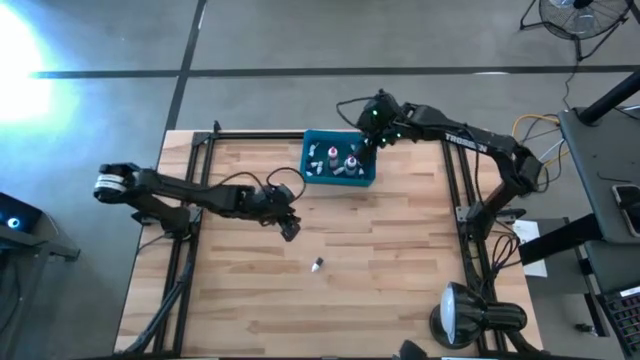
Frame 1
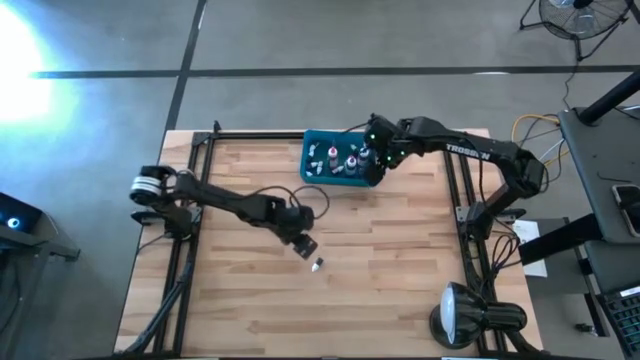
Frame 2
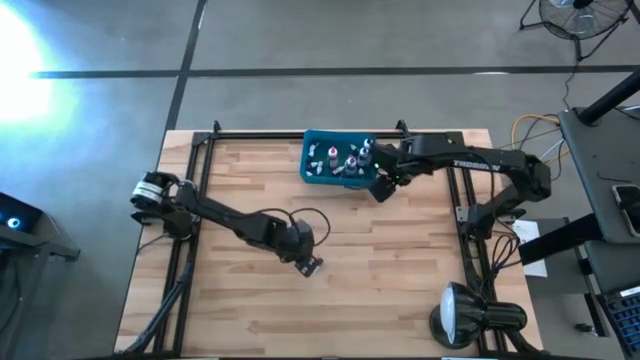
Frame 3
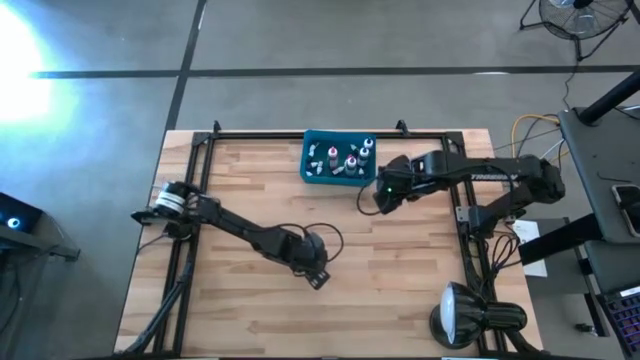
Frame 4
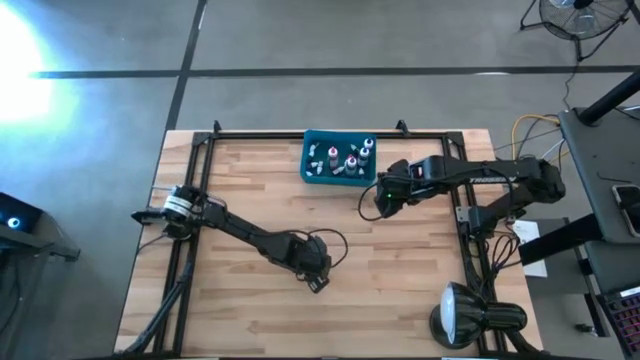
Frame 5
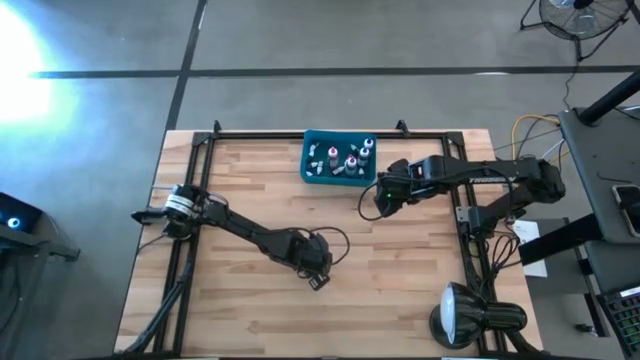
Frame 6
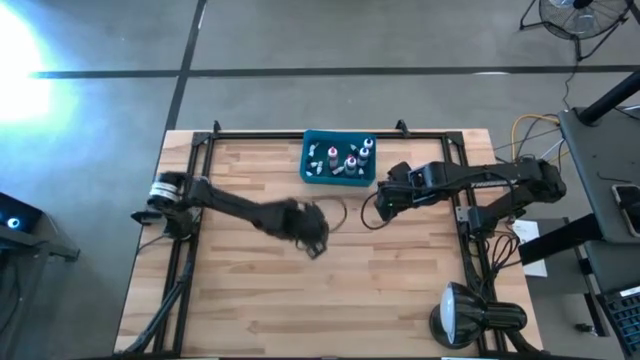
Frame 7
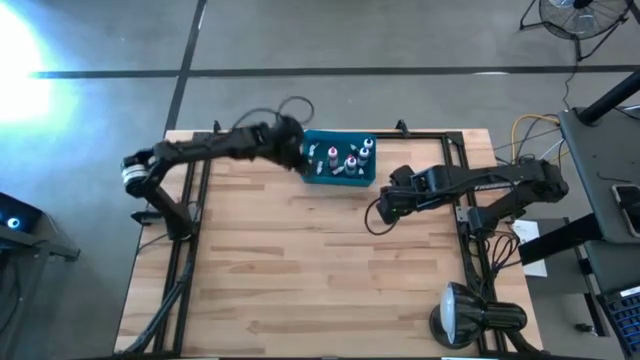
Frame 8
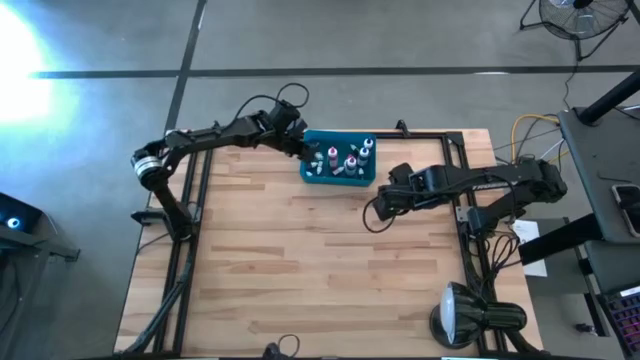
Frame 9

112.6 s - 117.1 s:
Task: Pick & Place food coloring
Put the small black food coloring bottle into the blue bin

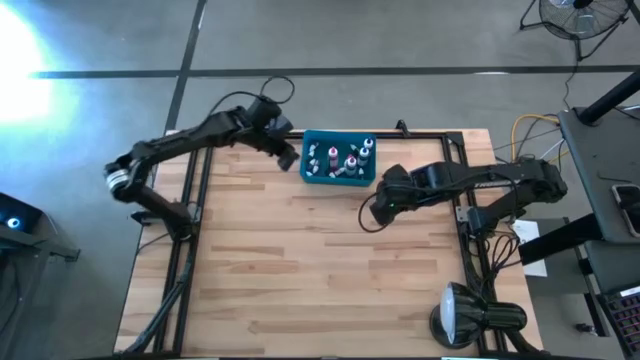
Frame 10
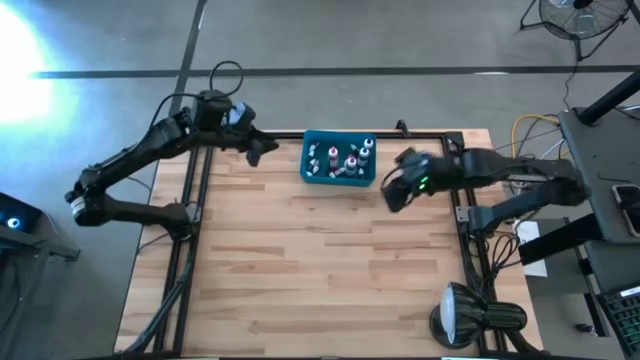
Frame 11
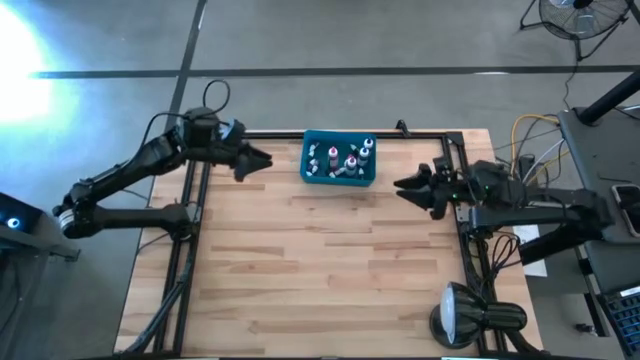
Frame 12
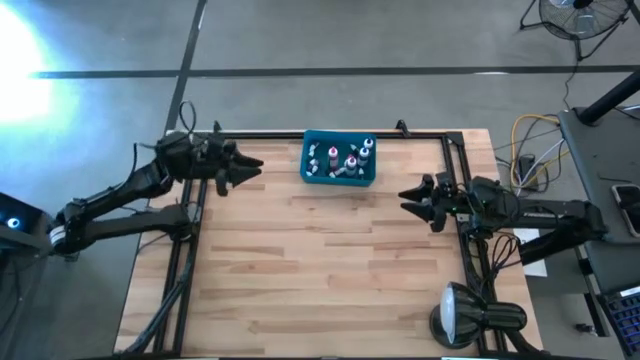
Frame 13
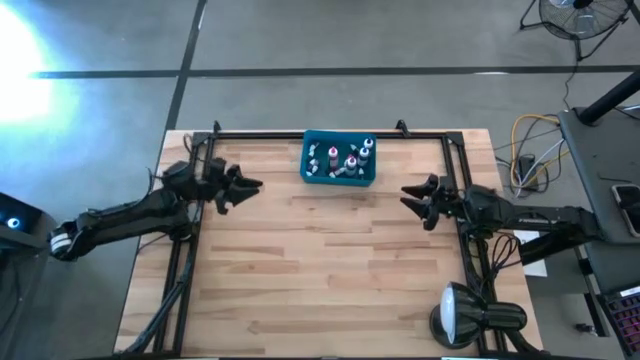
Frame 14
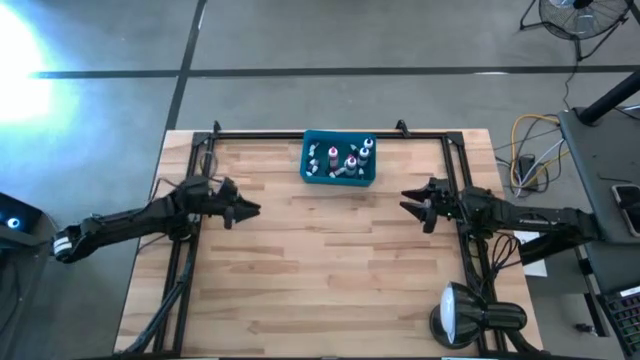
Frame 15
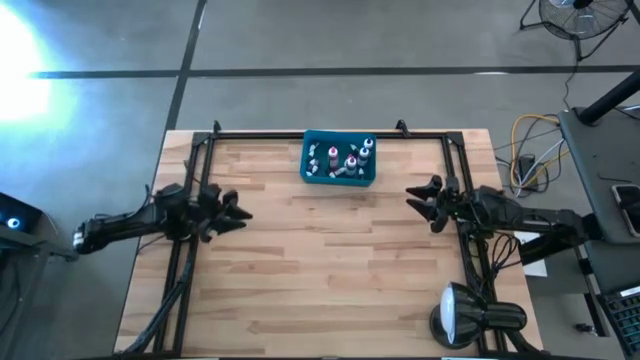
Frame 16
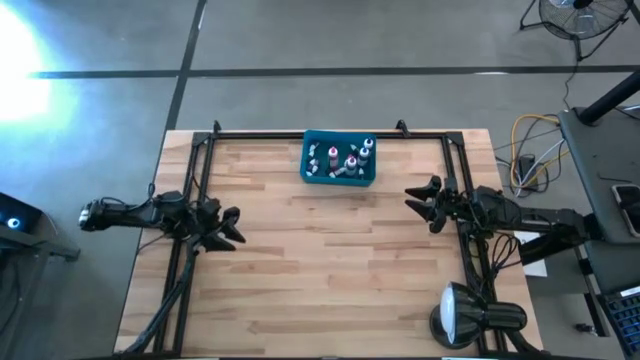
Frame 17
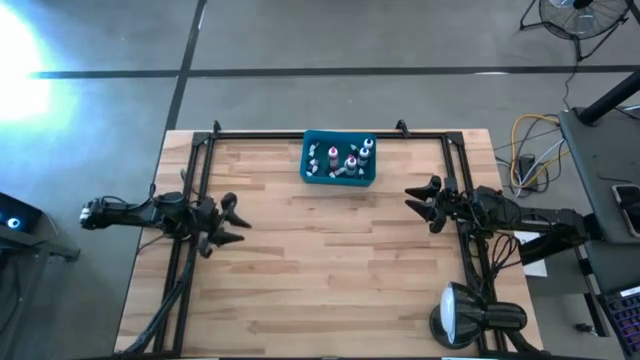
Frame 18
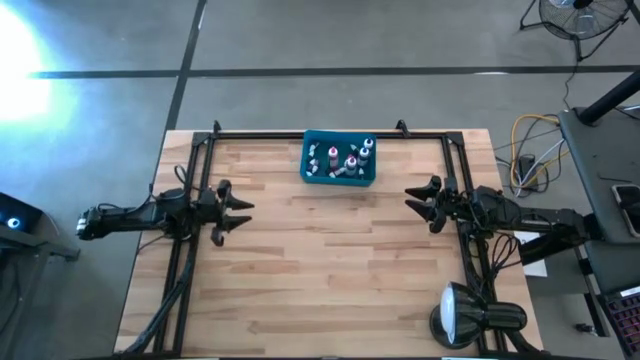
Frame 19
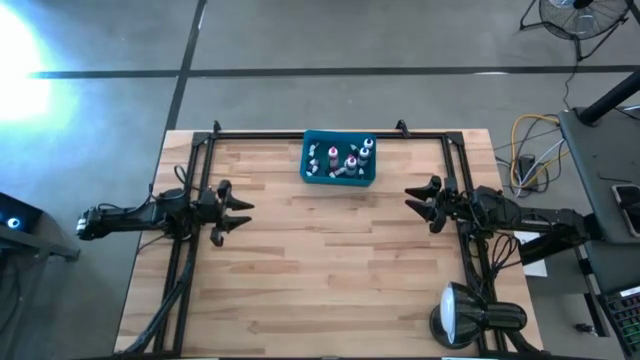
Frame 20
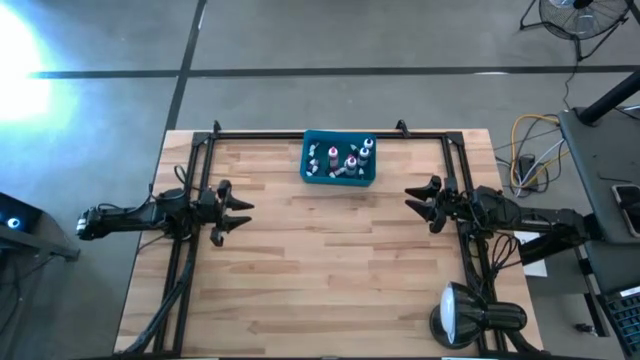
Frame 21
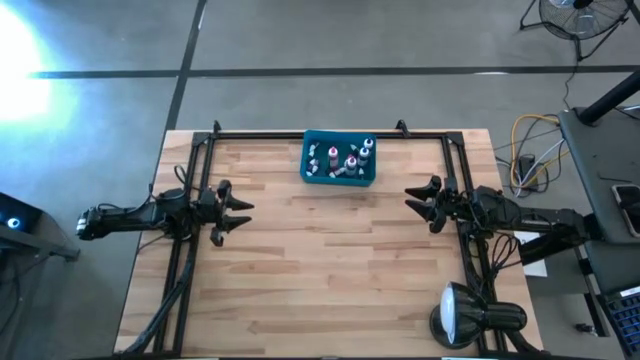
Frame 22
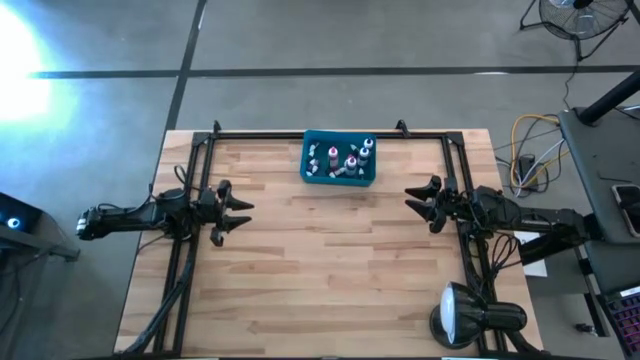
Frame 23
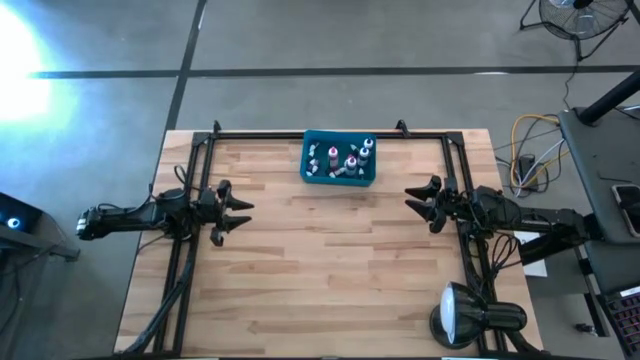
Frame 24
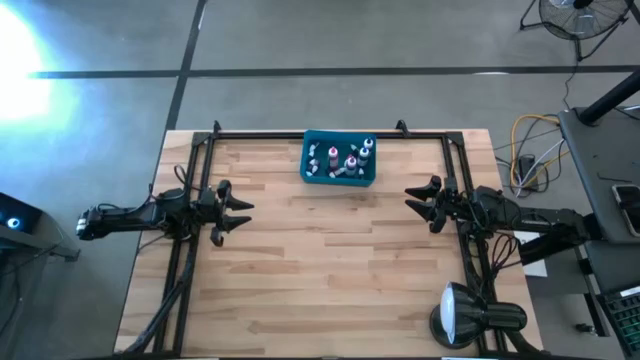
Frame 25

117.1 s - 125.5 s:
Return to Home Position

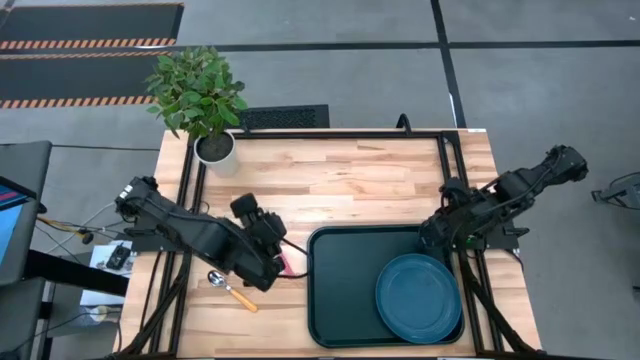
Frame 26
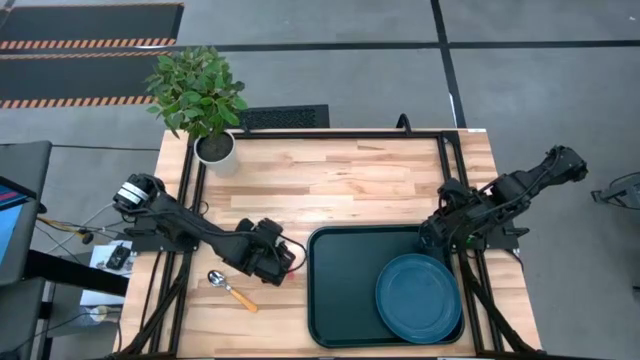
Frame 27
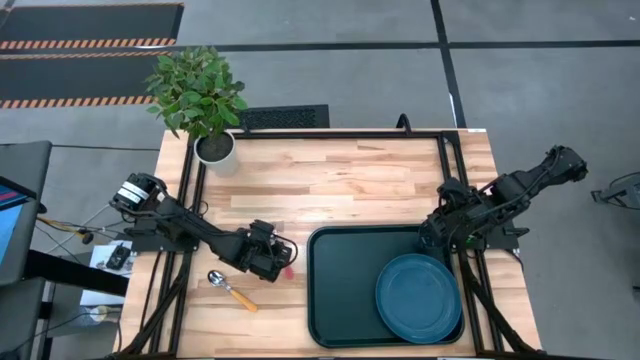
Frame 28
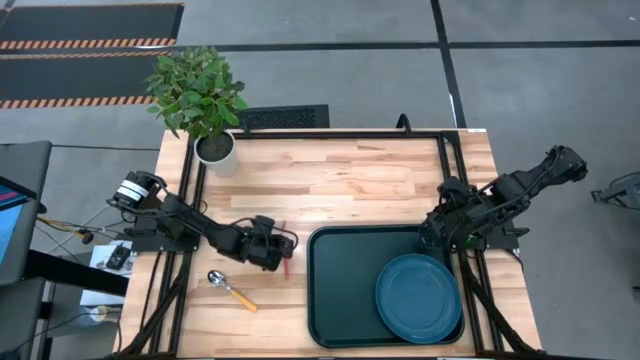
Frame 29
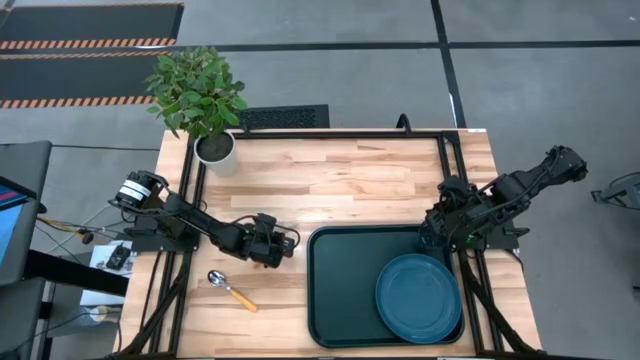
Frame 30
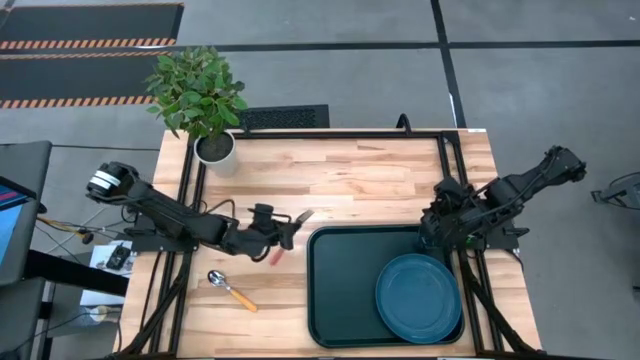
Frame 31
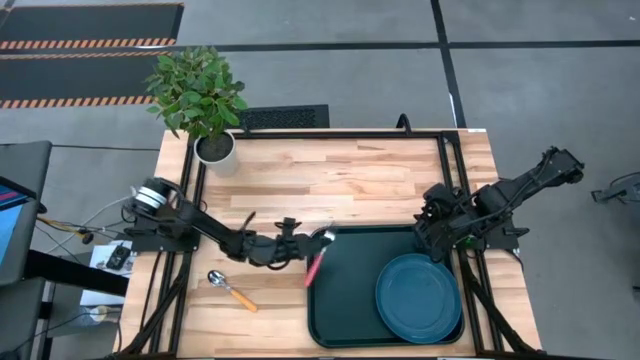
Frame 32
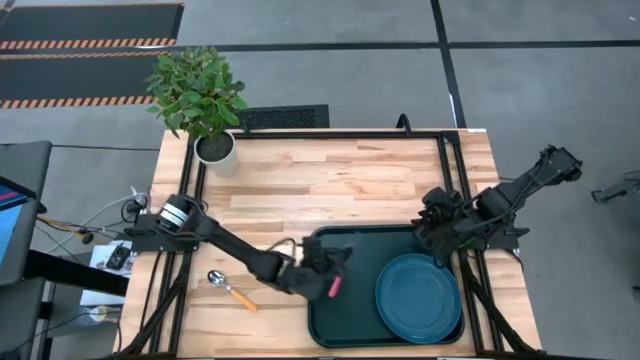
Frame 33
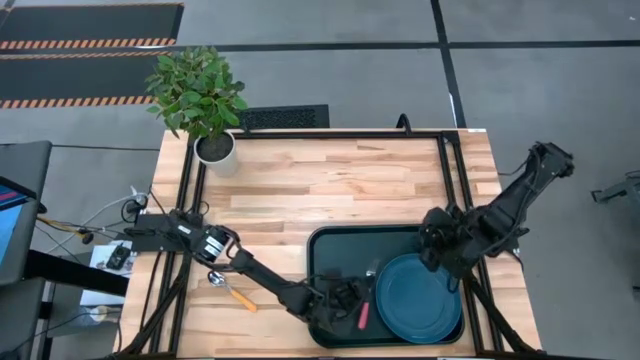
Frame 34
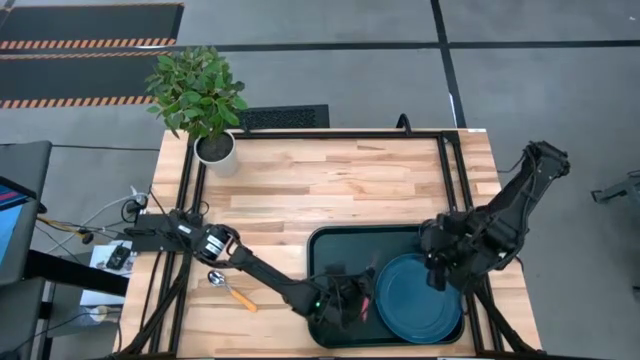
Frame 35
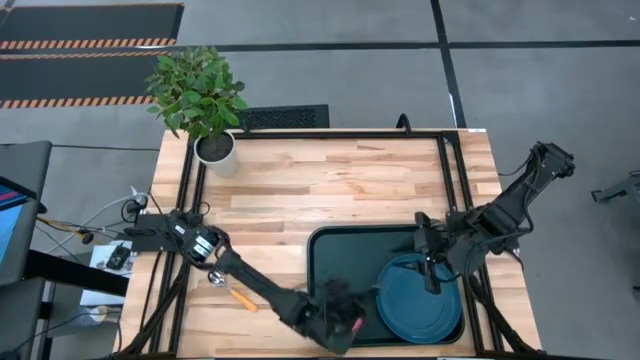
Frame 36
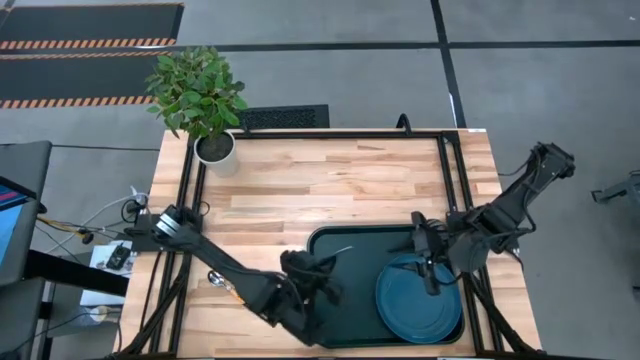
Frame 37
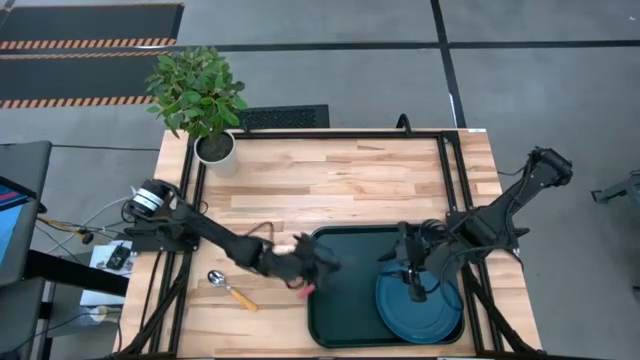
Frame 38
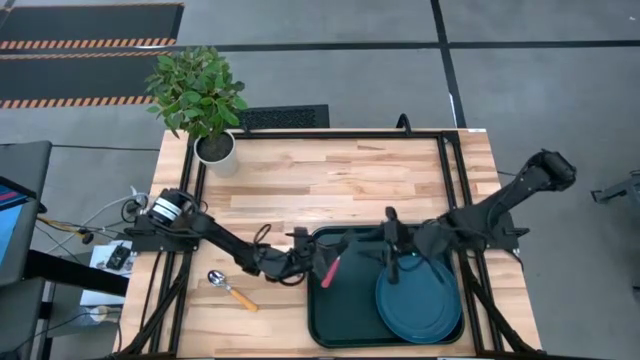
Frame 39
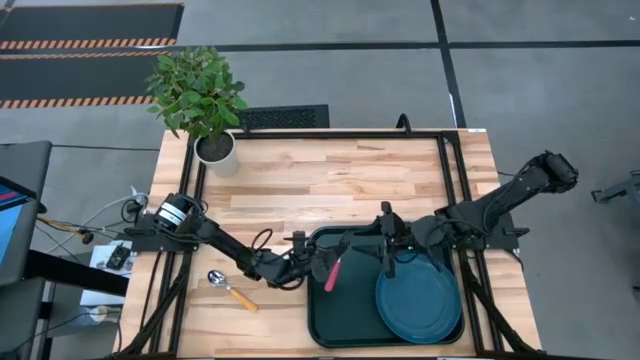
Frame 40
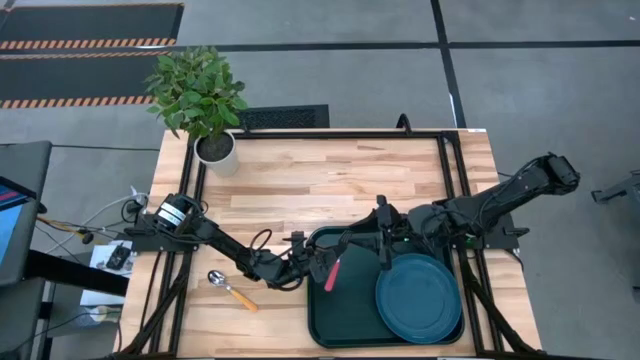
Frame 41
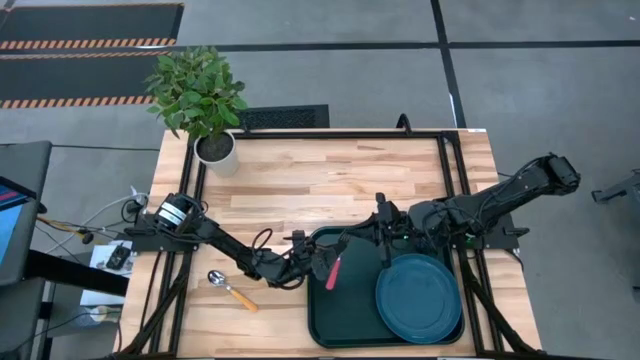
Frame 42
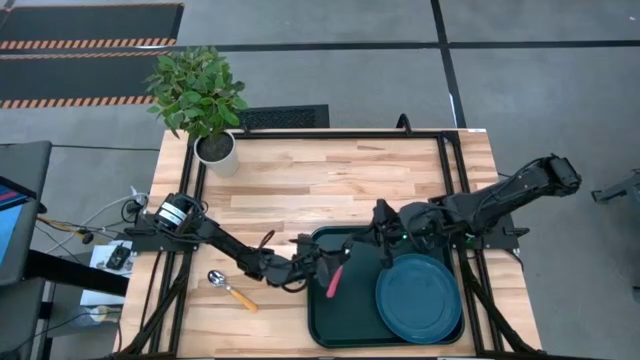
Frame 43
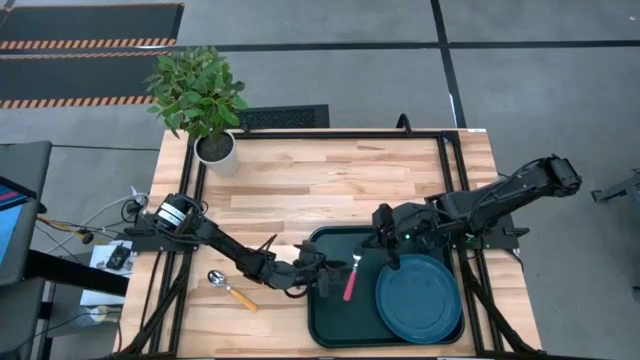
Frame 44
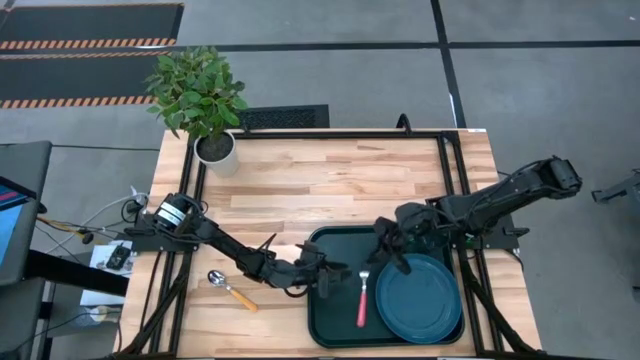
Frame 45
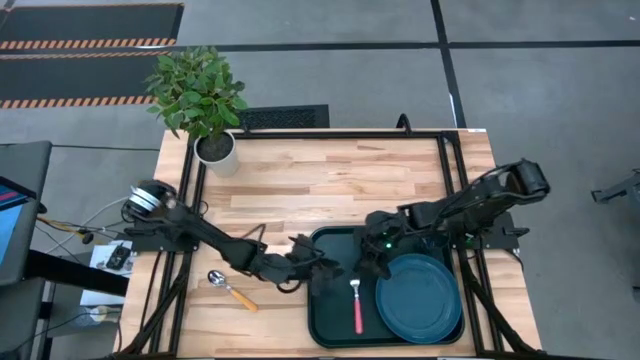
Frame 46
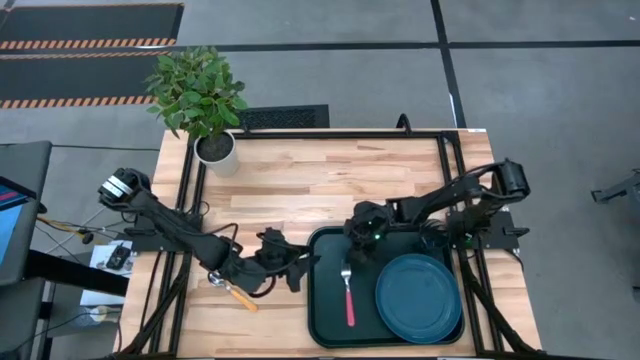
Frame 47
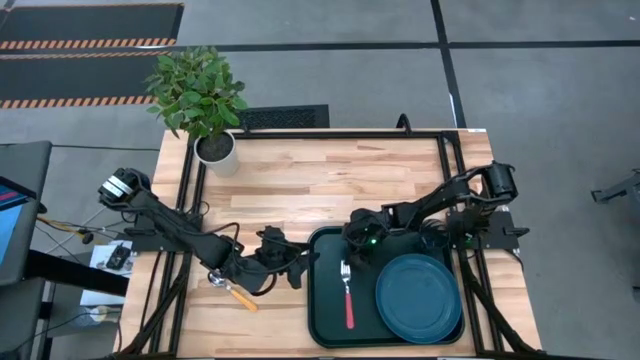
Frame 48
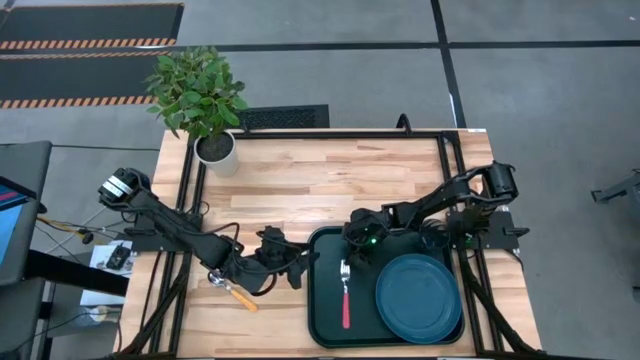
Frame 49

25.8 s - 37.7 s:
Task: Pick and place plate/cup/fork/spoon on tray
Put the pink fork on the black tray
